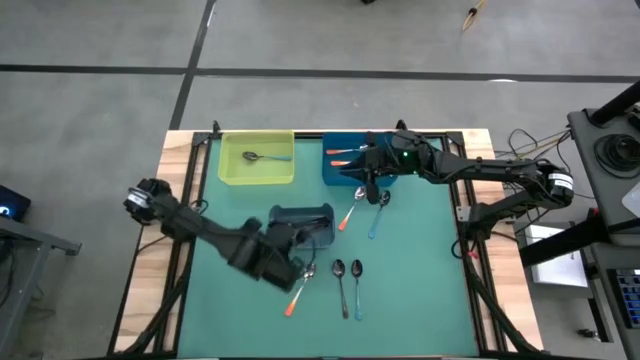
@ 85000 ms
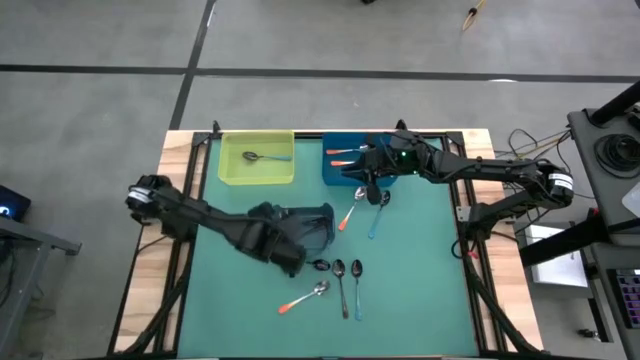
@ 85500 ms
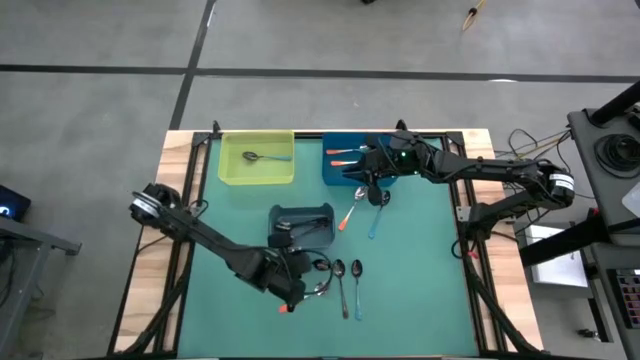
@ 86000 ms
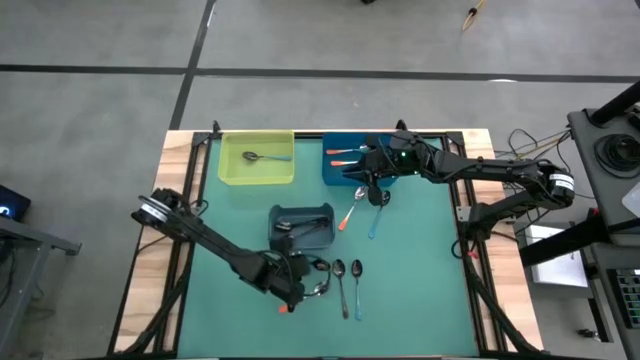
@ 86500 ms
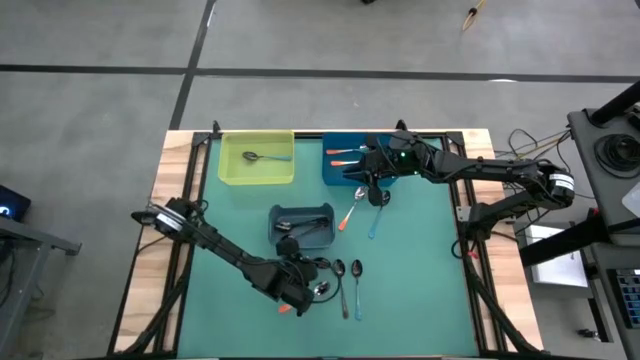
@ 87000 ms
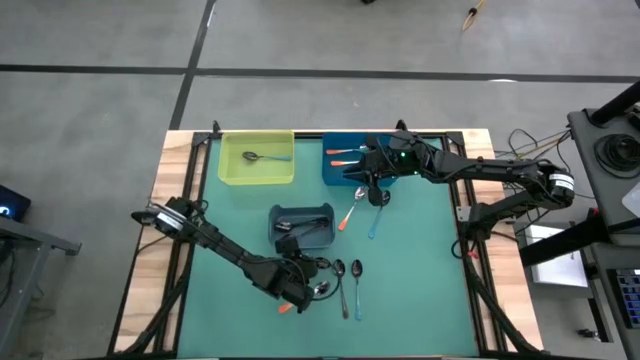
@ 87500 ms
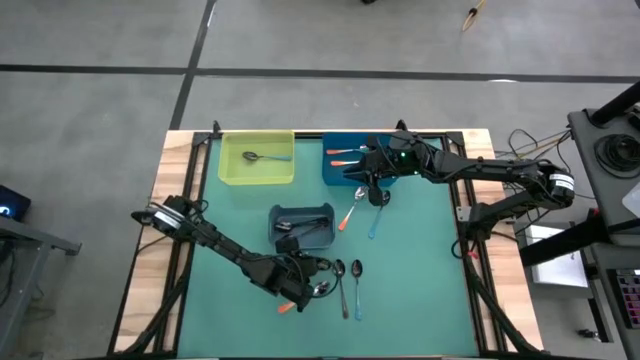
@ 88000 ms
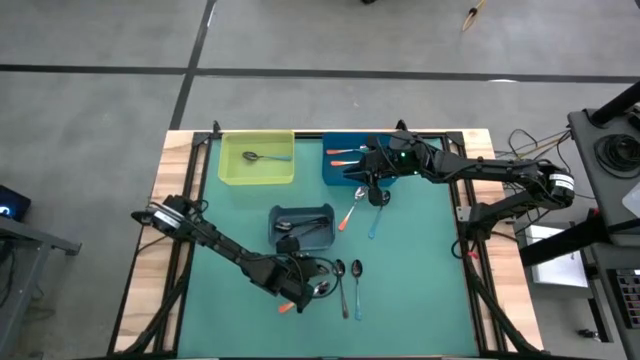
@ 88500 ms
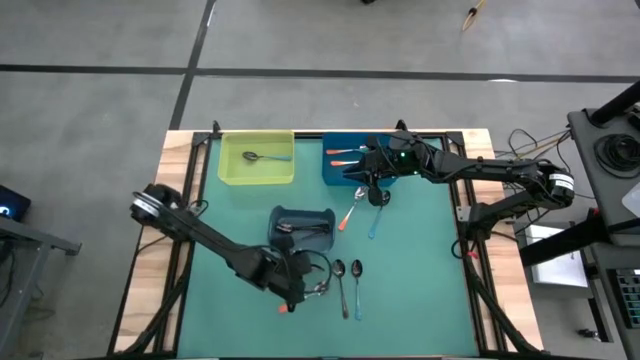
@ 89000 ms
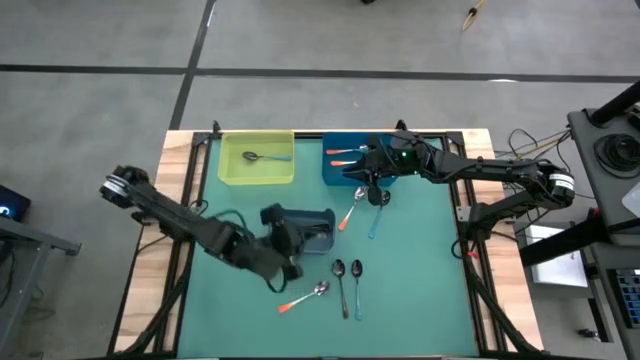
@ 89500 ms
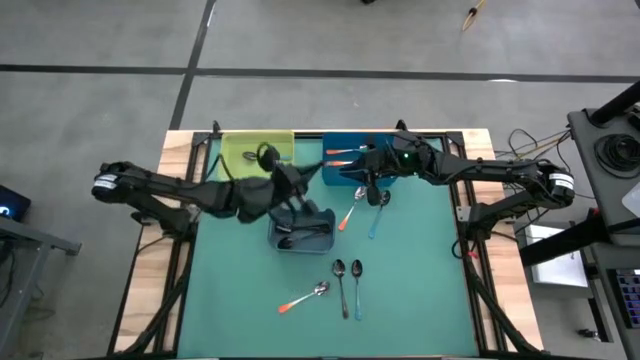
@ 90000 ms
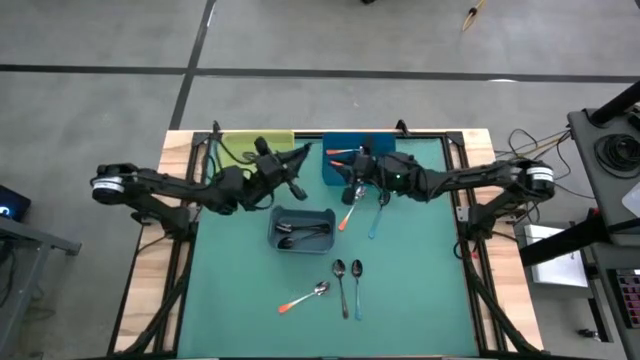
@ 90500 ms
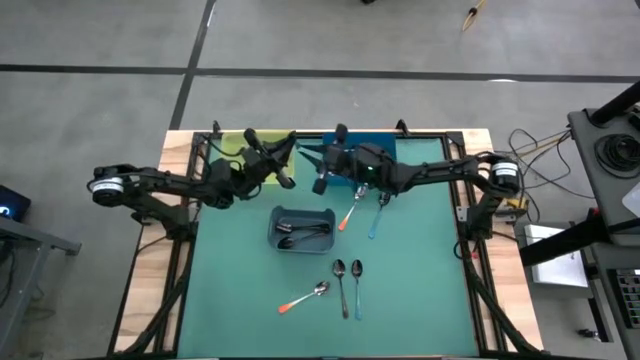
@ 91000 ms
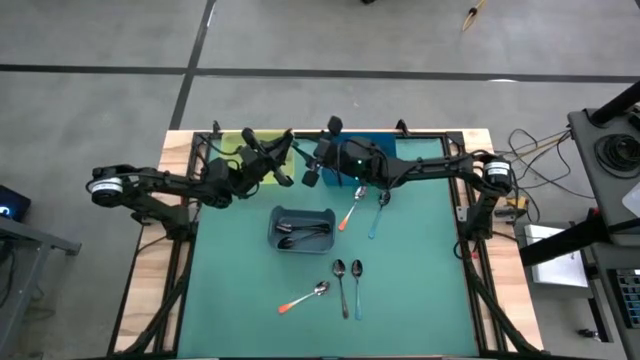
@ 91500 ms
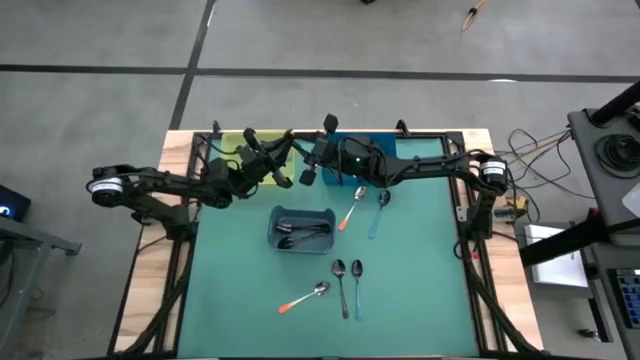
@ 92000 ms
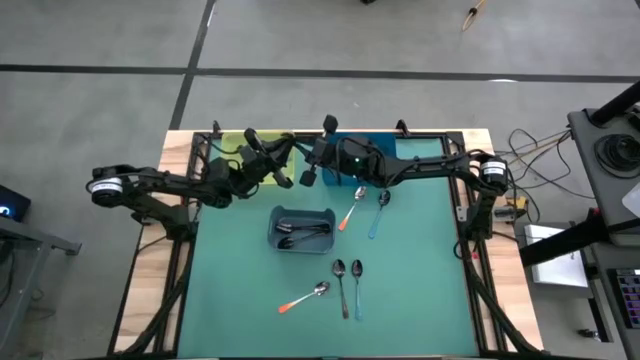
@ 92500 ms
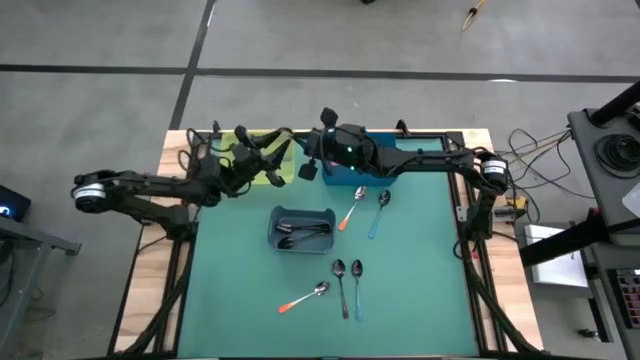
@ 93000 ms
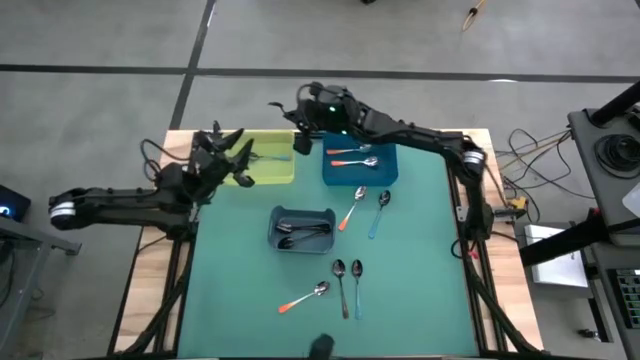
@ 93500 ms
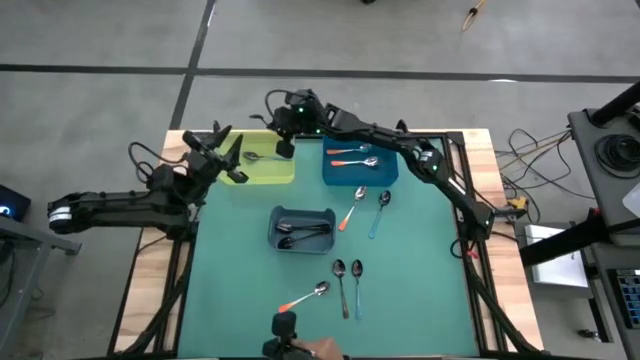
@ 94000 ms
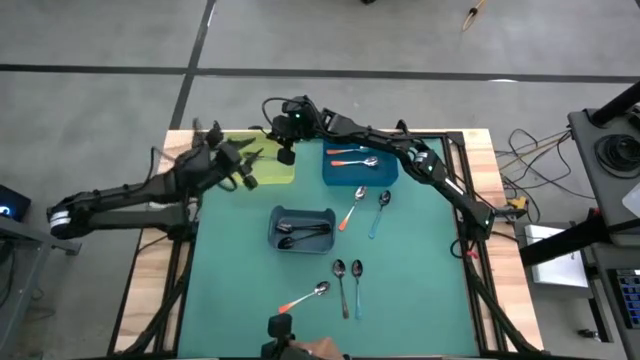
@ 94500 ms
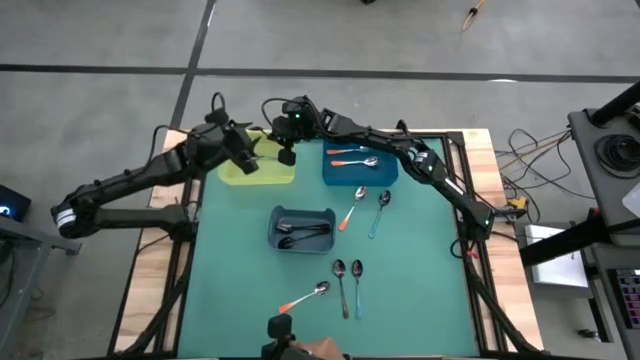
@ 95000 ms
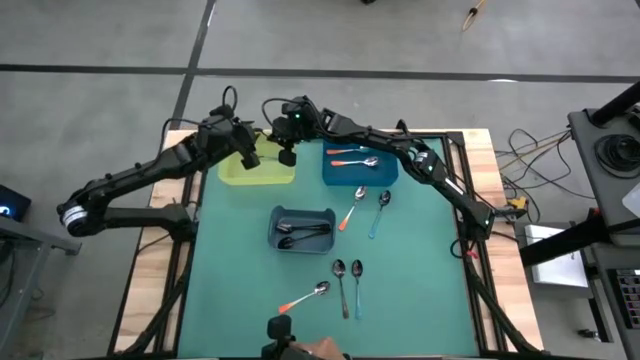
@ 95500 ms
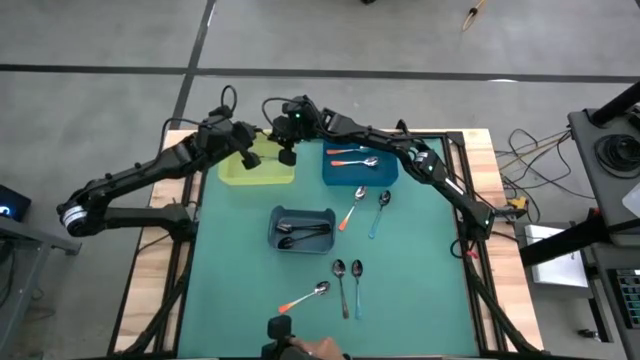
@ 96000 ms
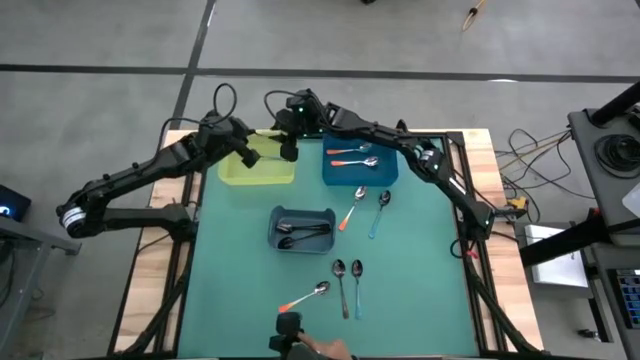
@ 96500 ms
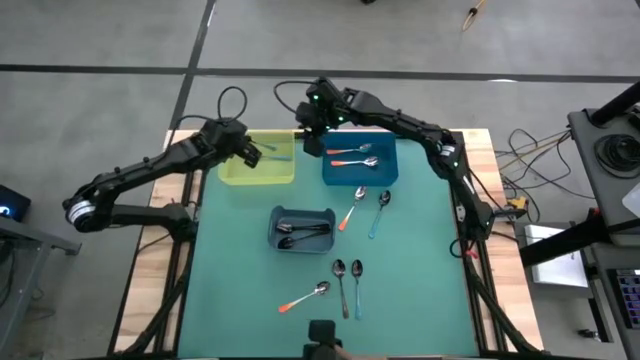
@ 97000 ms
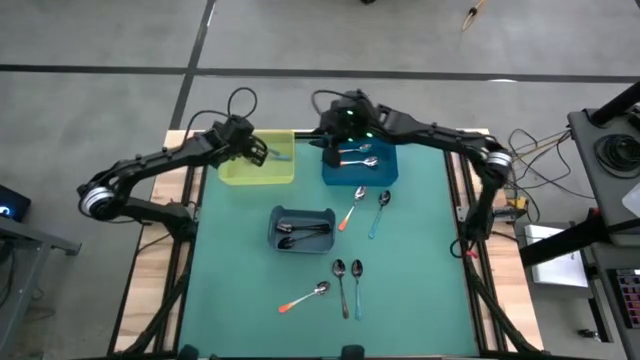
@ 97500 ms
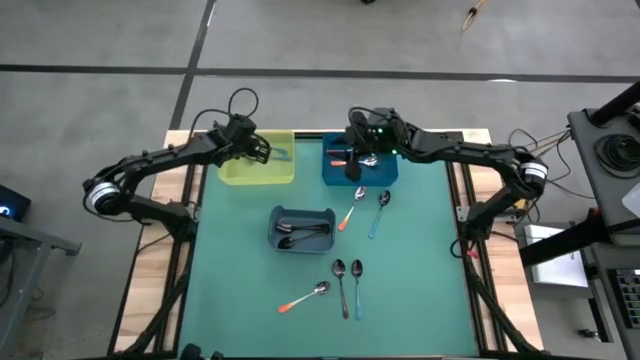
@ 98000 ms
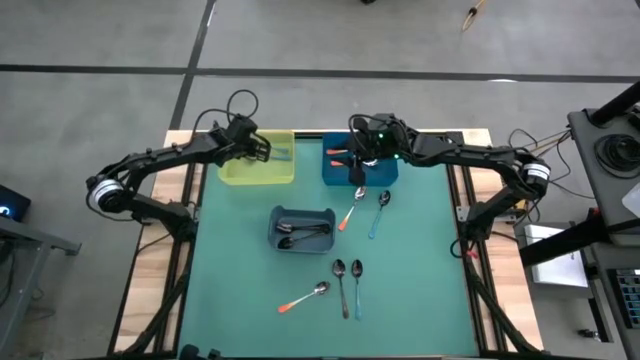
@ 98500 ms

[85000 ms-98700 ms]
Task: Sort silverware by color (type)
Put the blue spoon into the green bin

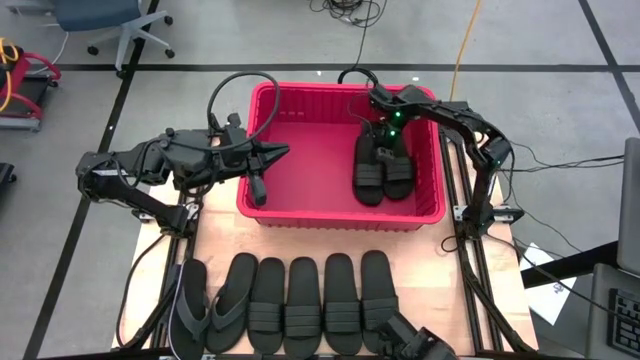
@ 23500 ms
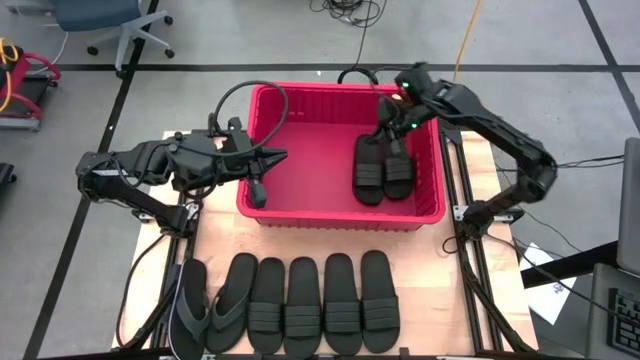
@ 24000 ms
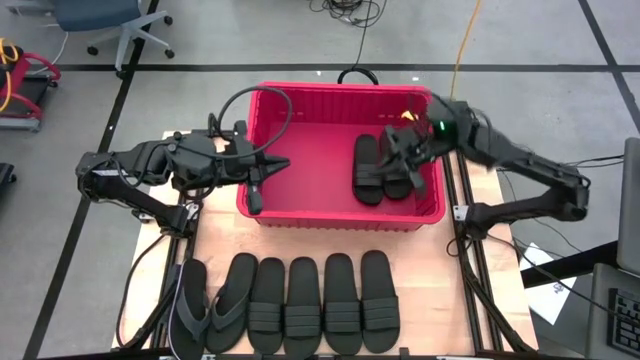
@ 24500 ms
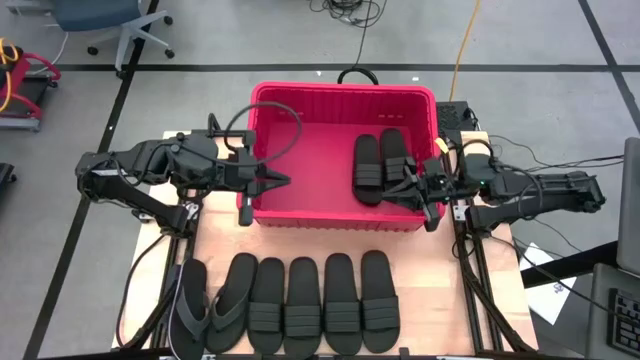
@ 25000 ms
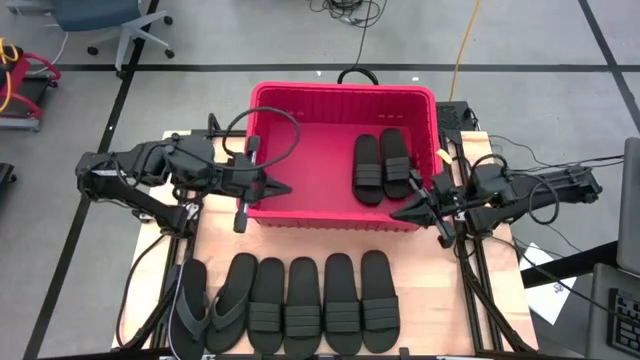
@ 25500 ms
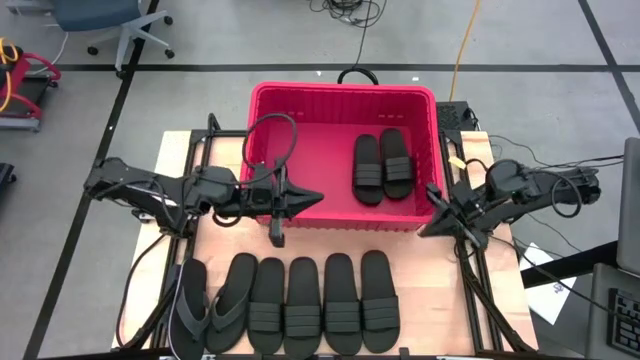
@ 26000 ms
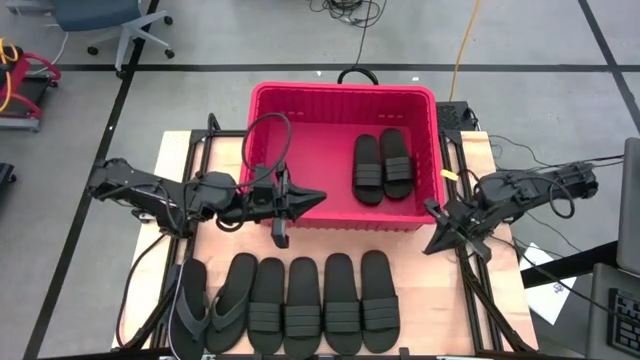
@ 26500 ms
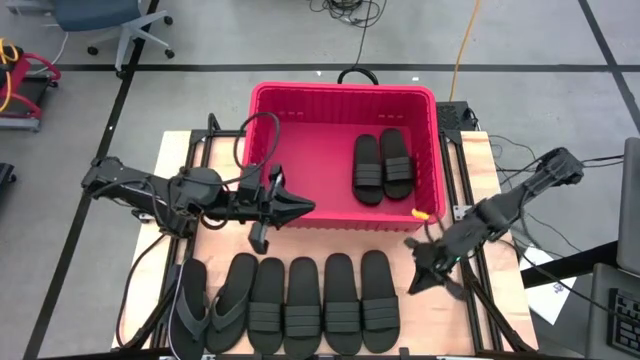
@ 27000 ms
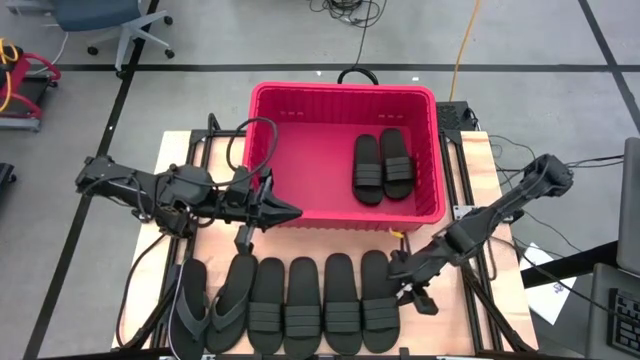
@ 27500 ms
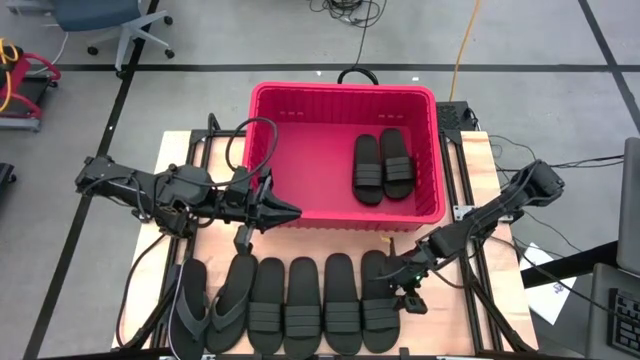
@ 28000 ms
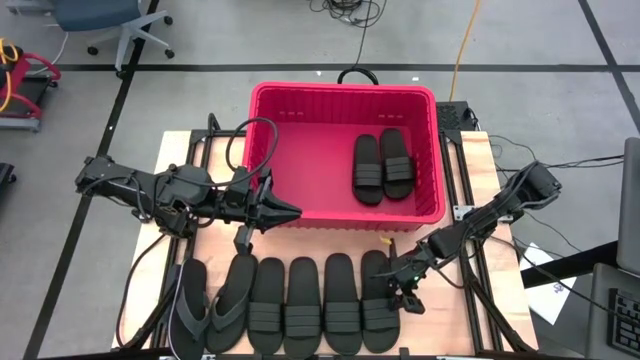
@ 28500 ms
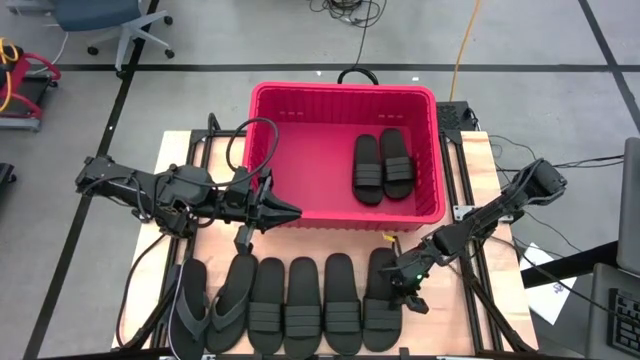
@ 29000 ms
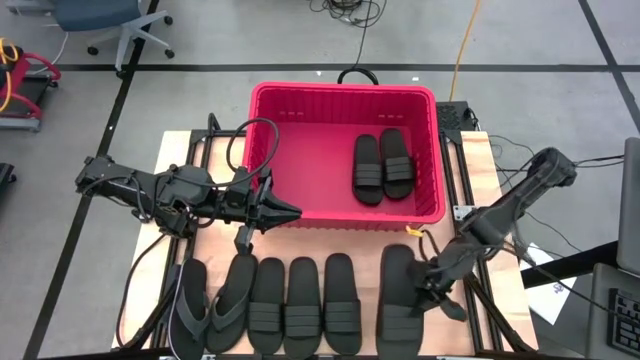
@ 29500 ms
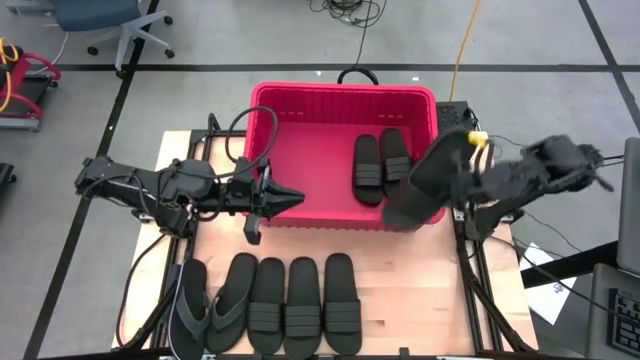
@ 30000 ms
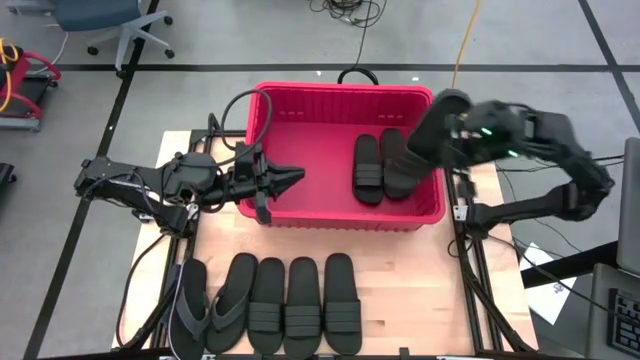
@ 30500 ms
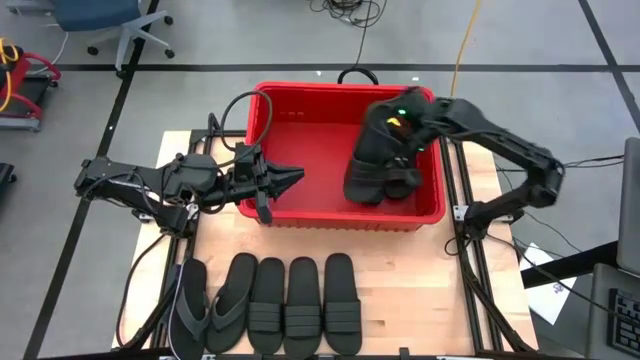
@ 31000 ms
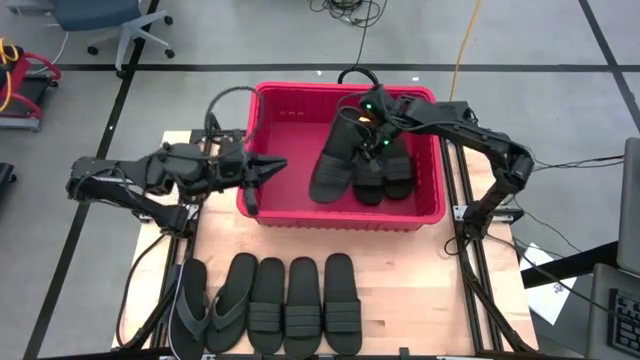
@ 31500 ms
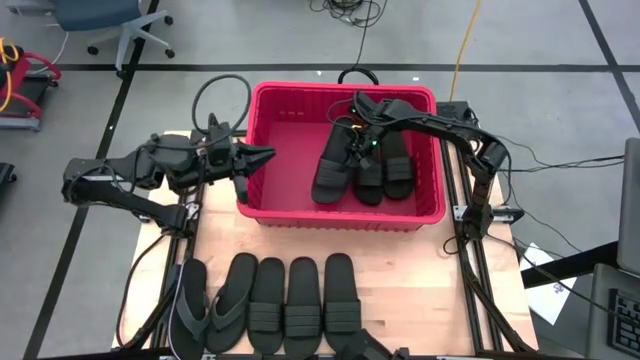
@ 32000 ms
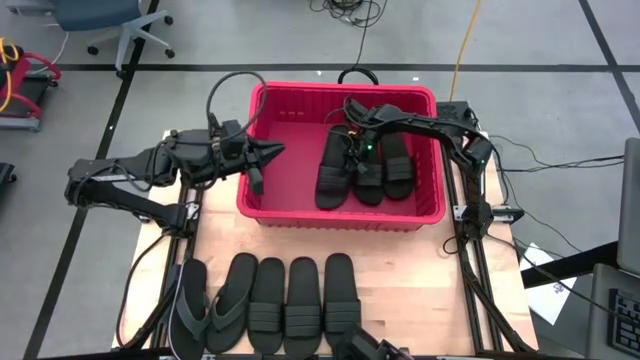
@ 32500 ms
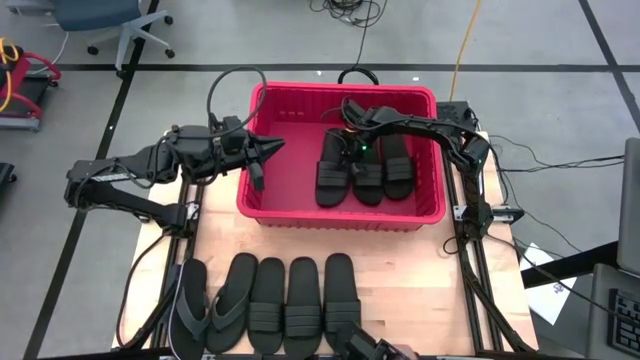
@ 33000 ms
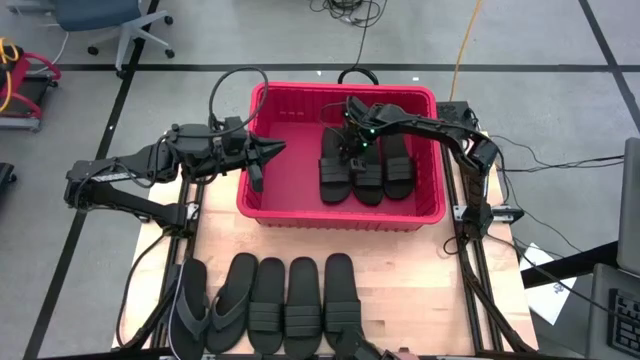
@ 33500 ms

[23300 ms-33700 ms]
Task: Pick and place slides into bin
Put the black slide into the red bin
